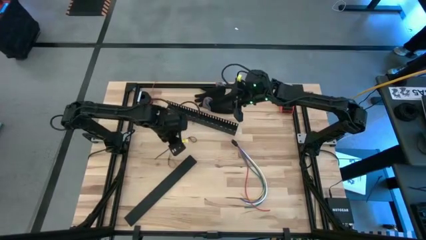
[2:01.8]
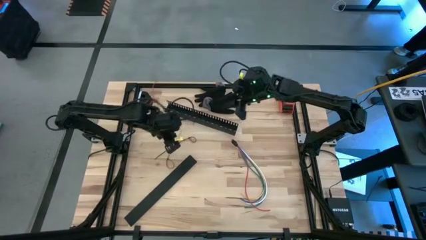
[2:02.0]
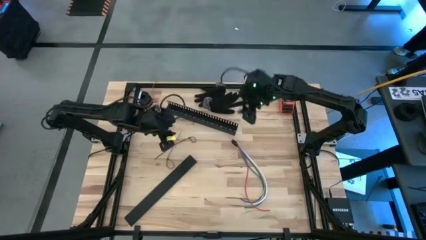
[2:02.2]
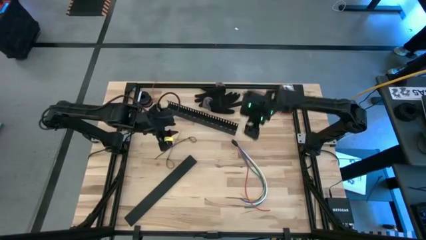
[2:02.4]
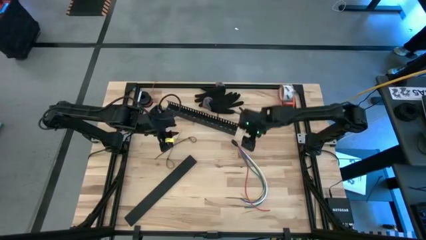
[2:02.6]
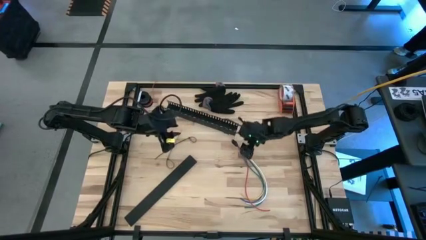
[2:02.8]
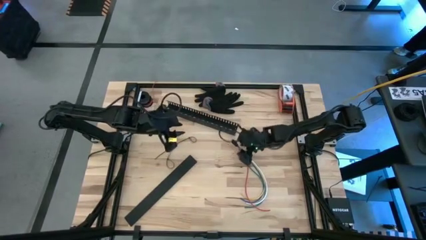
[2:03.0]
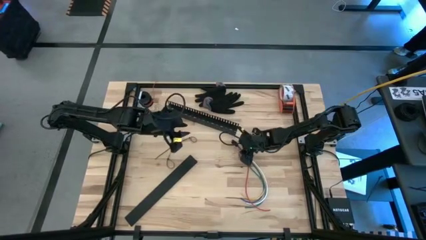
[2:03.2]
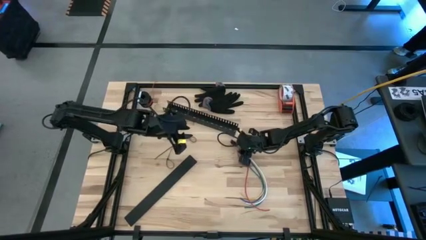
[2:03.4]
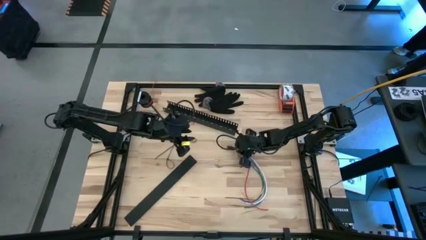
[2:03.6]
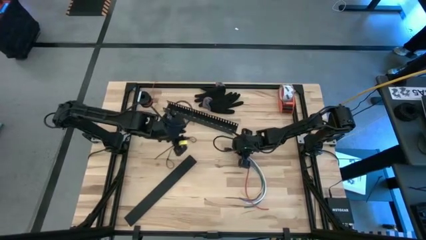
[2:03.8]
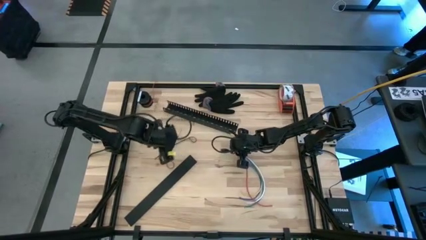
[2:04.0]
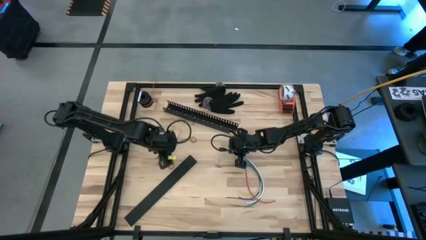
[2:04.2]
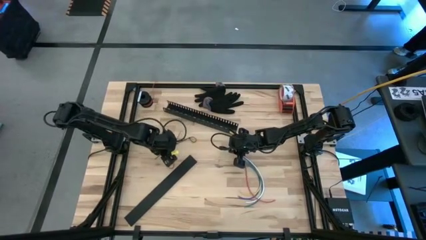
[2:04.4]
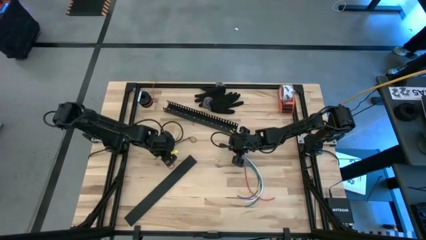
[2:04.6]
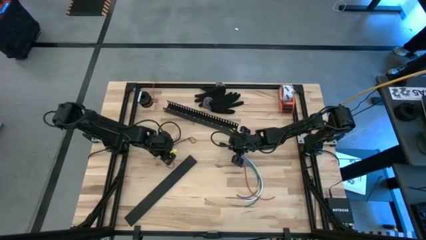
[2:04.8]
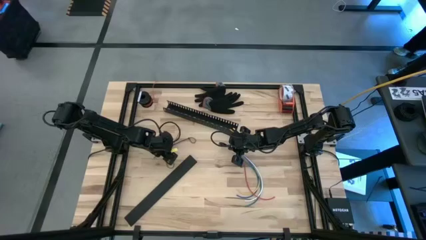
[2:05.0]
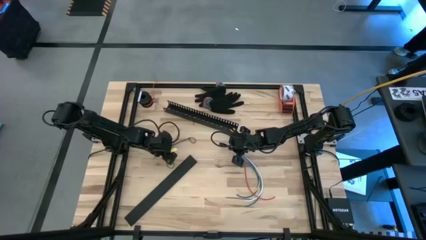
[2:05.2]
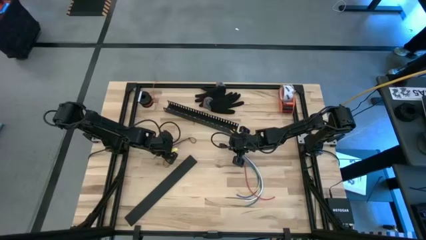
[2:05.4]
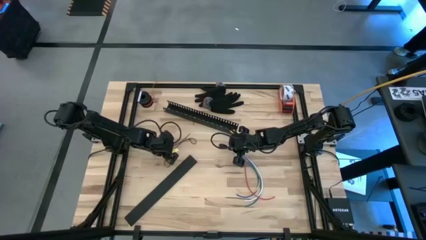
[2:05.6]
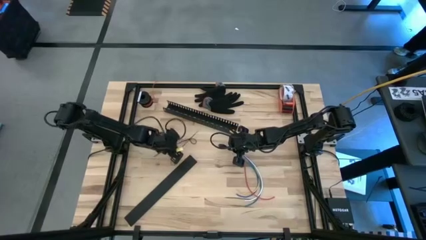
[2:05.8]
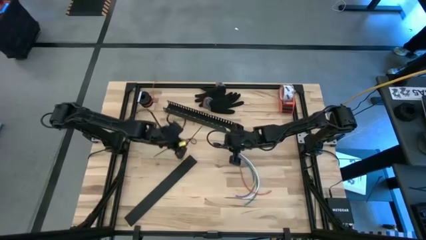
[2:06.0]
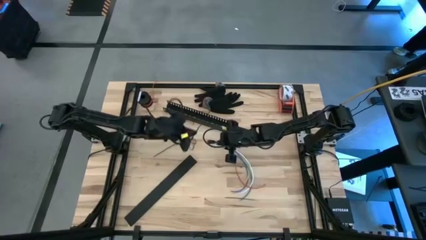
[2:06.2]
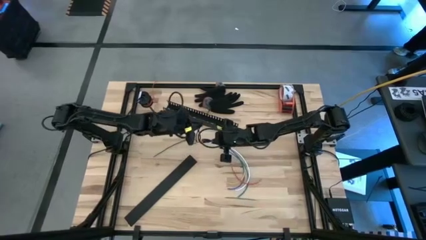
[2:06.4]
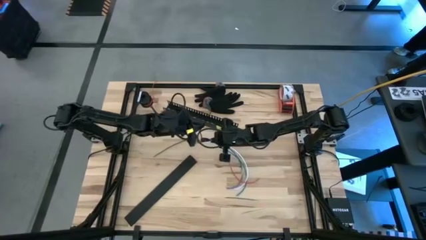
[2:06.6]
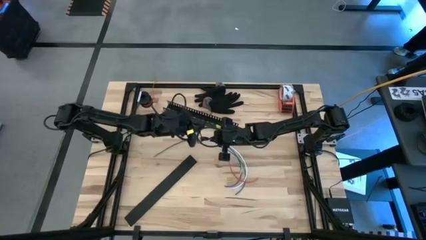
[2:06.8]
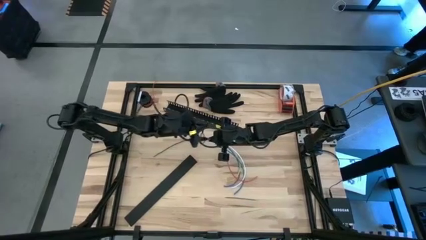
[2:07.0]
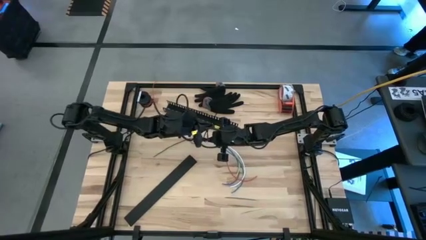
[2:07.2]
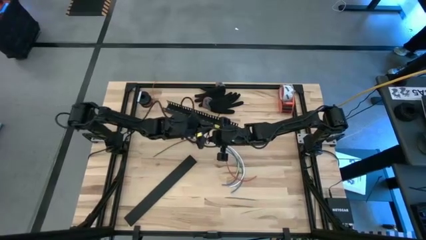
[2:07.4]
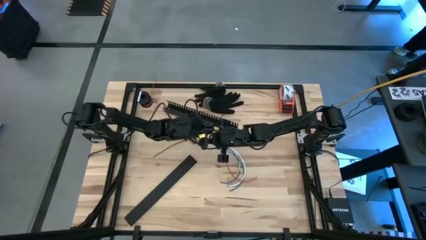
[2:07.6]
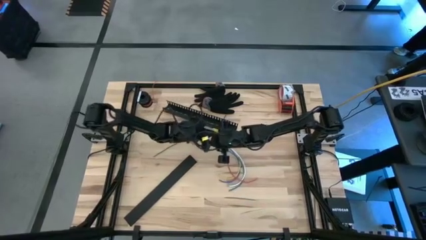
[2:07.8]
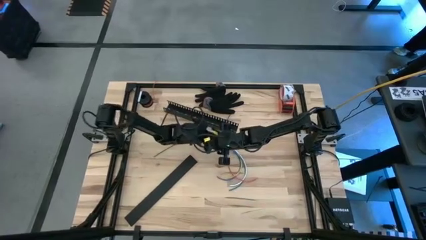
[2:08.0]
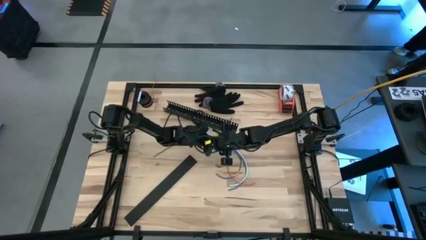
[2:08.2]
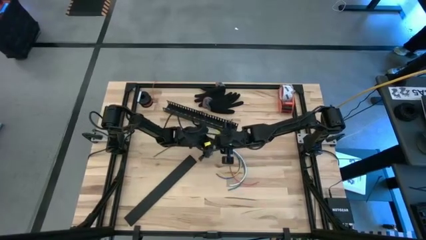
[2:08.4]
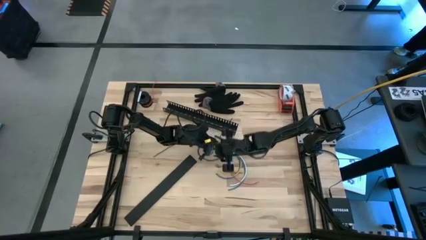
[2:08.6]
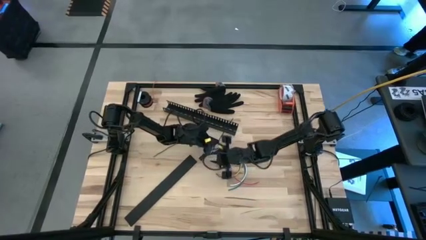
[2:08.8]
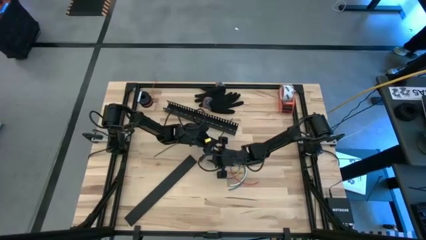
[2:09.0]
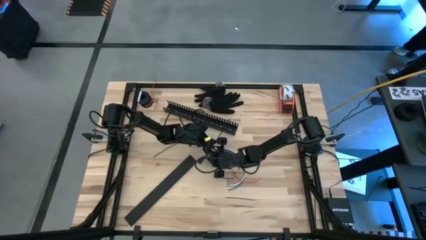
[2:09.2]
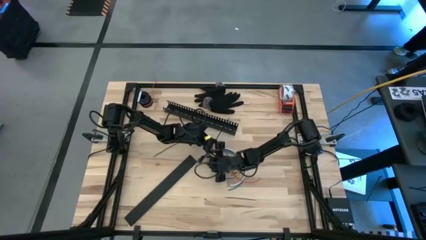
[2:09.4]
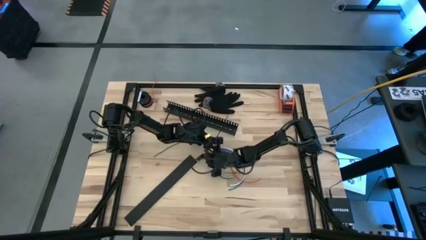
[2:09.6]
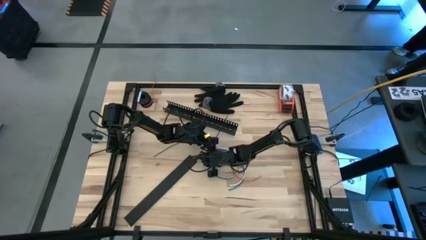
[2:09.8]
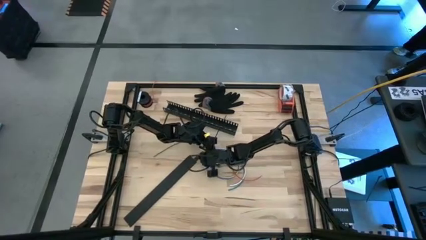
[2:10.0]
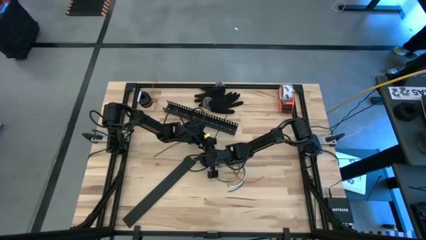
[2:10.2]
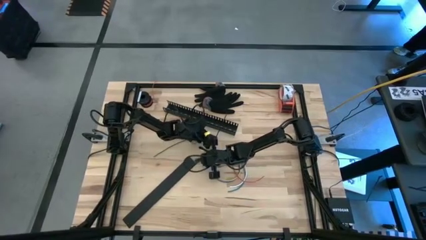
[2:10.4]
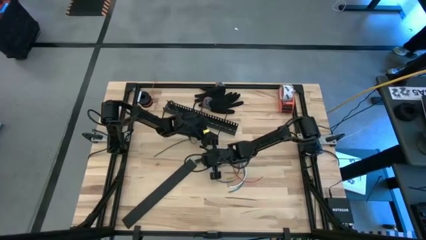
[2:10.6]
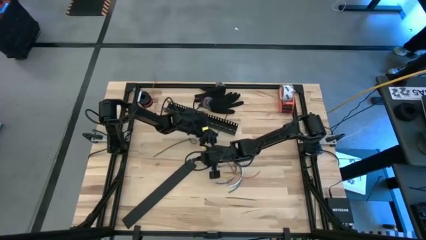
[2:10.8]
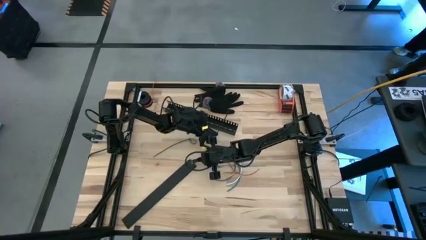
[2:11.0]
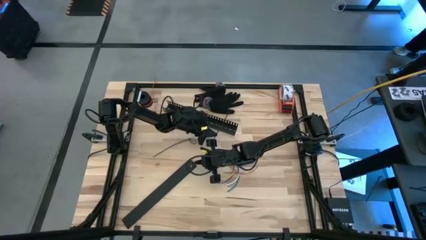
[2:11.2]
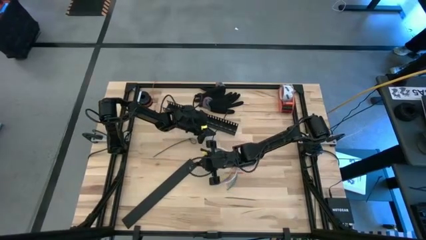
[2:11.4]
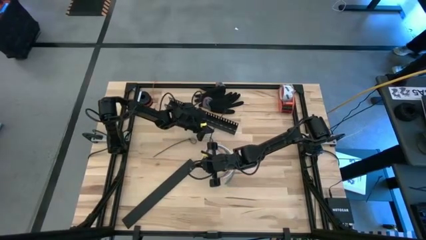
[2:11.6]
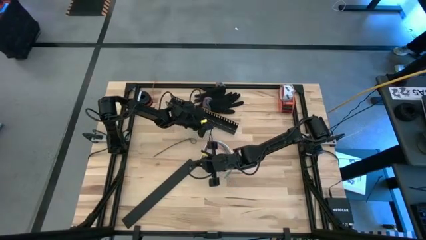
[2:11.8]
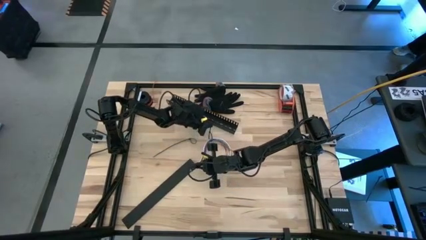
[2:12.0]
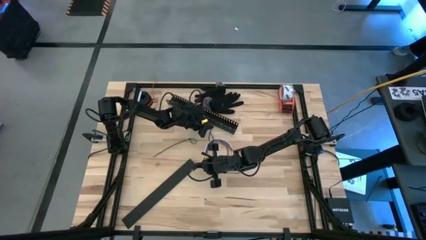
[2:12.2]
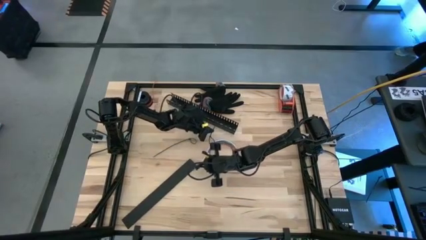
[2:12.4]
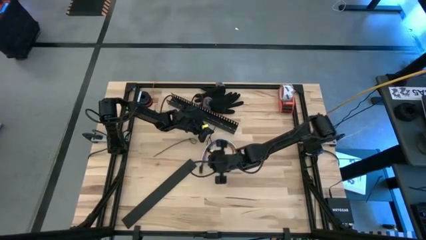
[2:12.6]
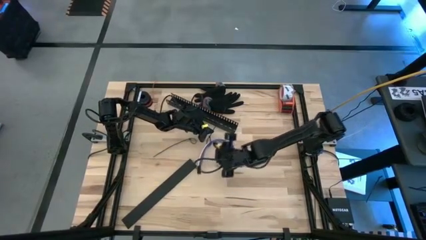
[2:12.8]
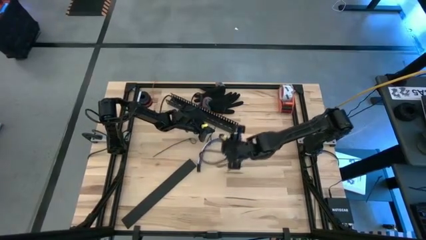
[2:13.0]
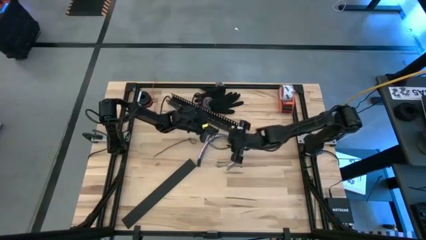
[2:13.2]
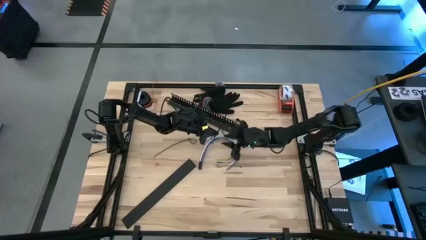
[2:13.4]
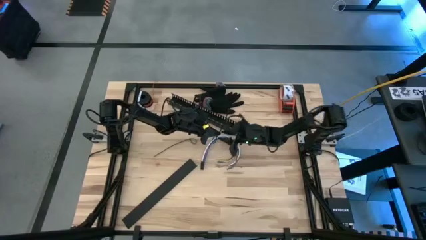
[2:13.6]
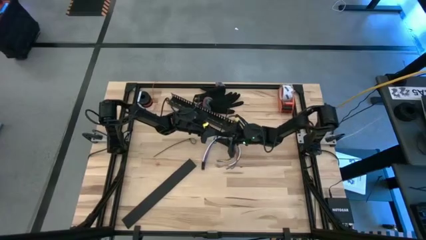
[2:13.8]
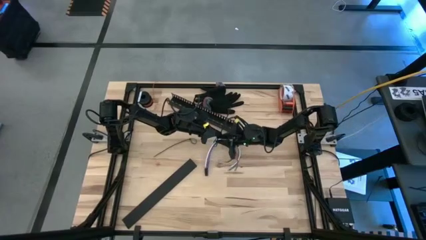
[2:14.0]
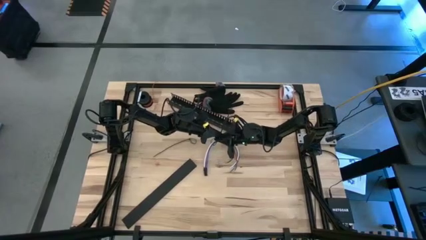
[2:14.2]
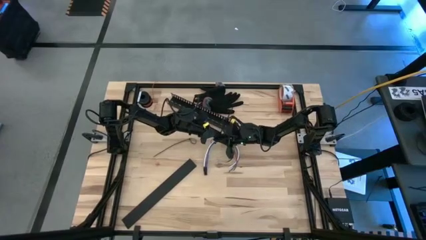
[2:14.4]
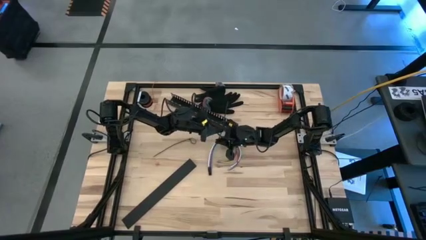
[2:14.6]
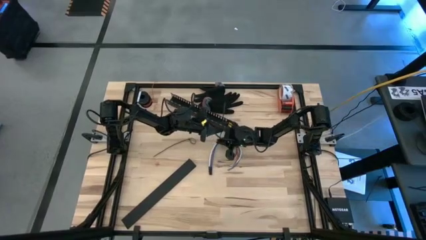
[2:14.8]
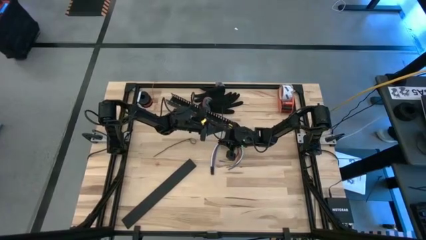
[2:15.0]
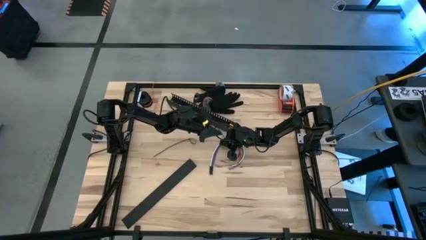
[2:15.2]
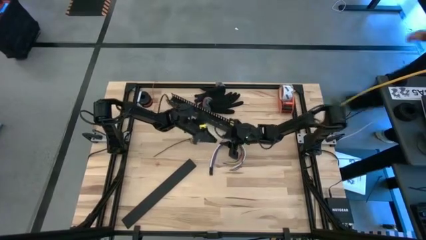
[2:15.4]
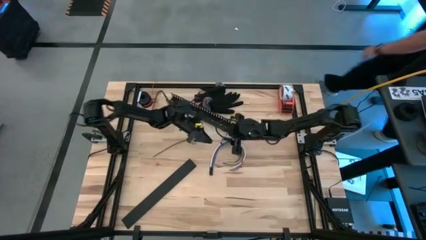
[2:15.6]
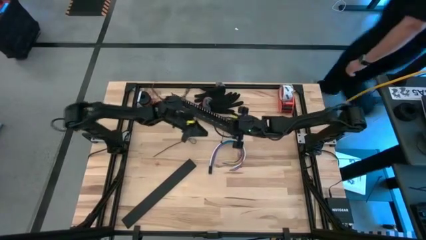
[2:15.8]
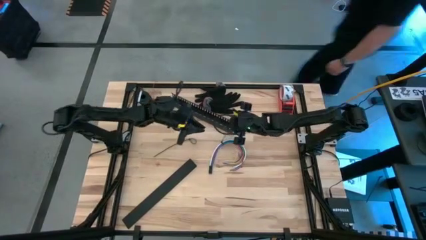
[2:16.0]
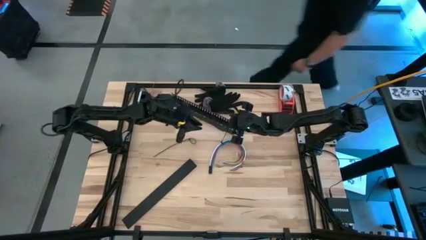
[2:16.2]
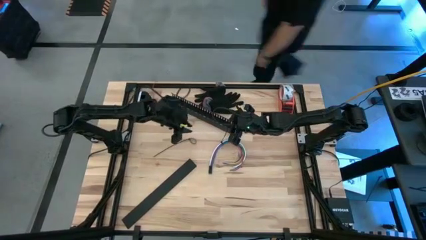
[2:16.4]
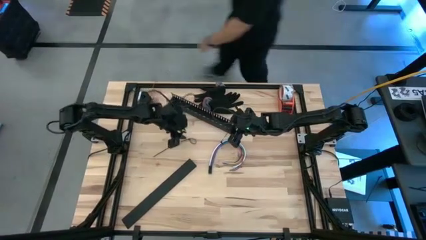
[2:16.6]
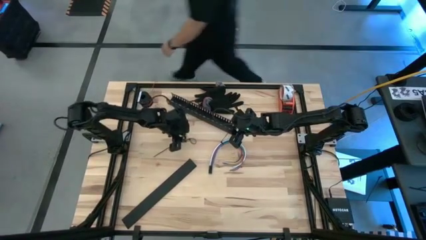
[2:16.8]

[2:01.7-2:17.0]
Task: Ziptie cables
Wrap the cable wires together using the black zip tie
